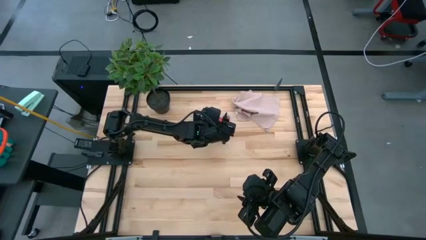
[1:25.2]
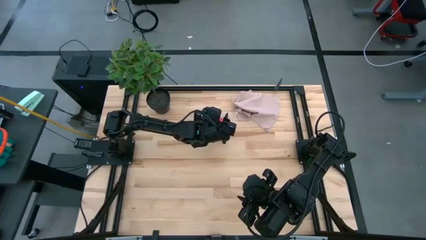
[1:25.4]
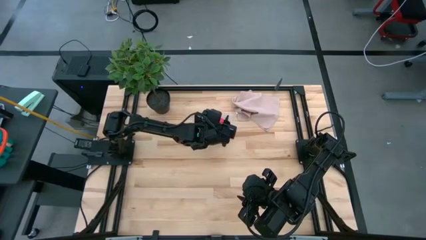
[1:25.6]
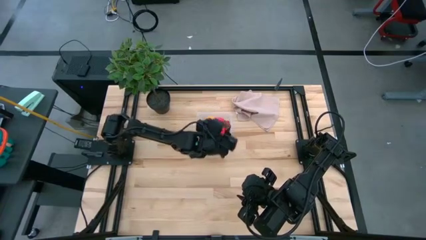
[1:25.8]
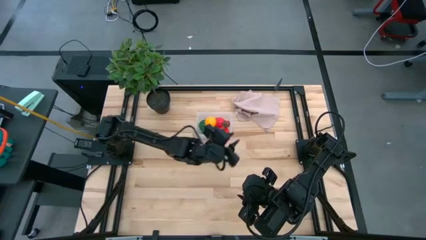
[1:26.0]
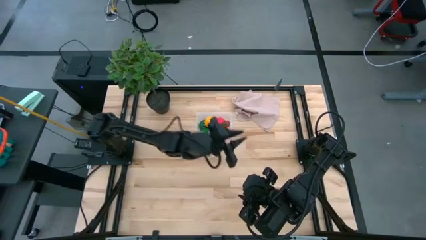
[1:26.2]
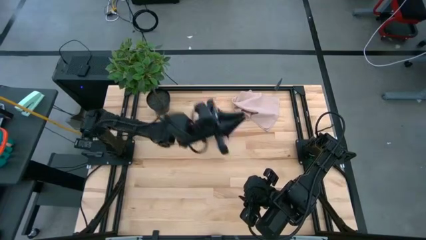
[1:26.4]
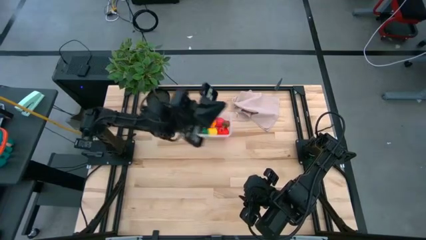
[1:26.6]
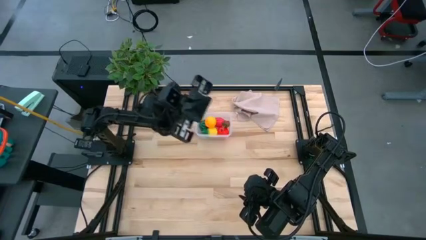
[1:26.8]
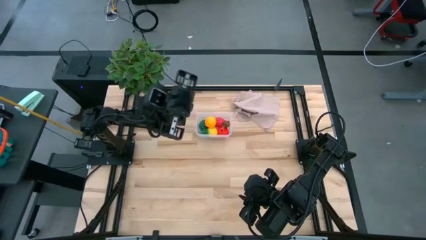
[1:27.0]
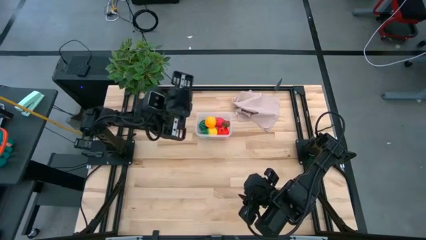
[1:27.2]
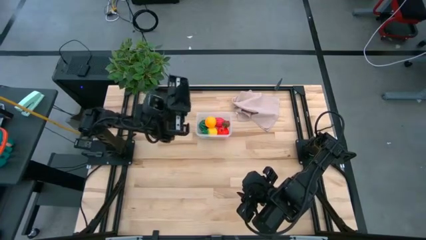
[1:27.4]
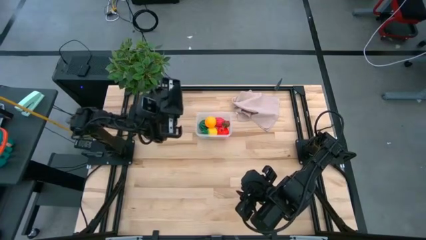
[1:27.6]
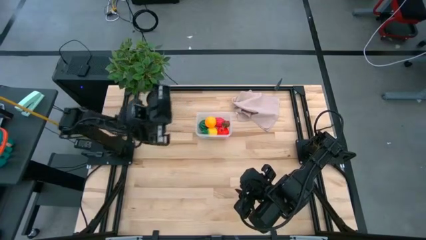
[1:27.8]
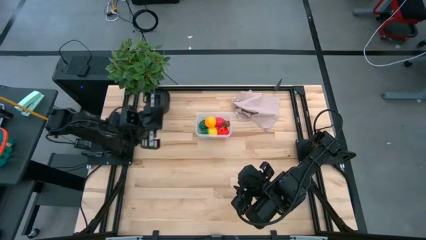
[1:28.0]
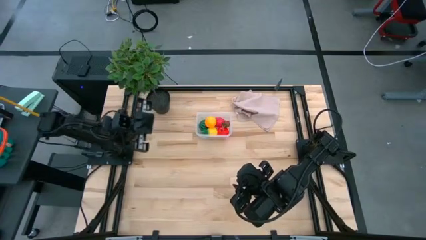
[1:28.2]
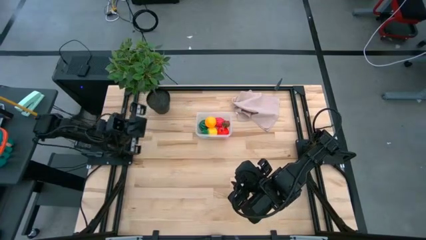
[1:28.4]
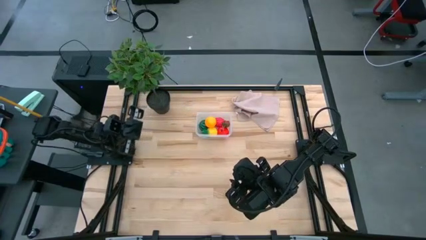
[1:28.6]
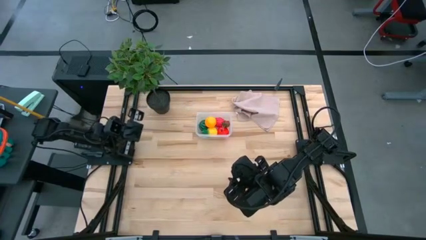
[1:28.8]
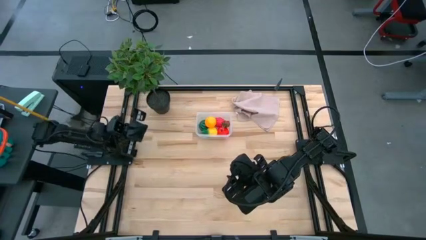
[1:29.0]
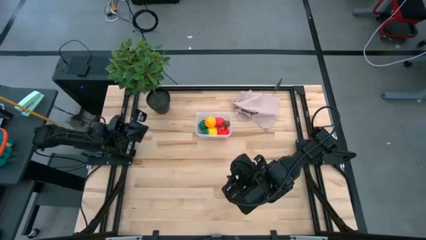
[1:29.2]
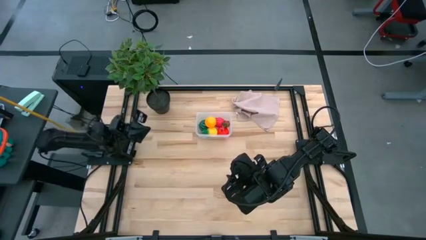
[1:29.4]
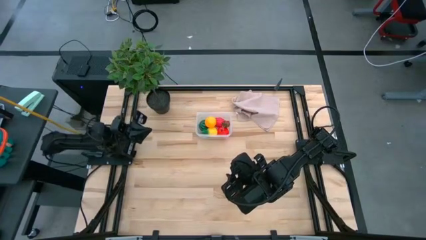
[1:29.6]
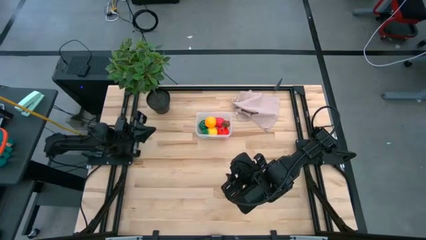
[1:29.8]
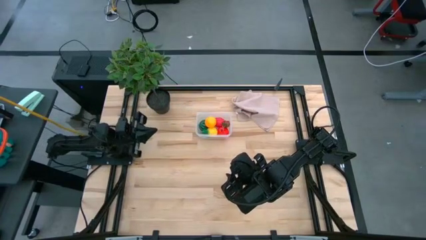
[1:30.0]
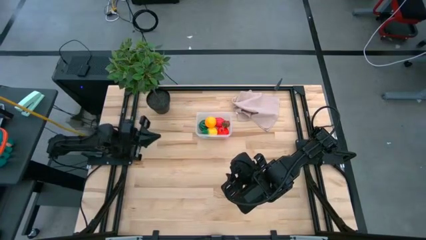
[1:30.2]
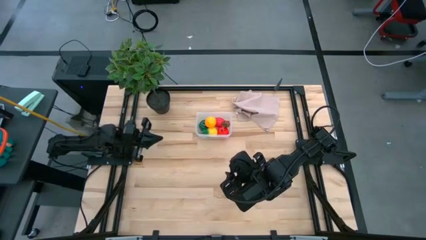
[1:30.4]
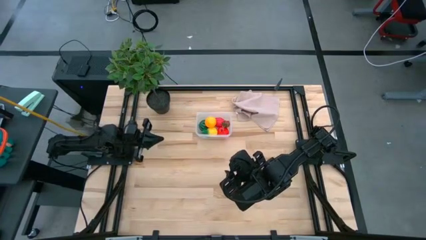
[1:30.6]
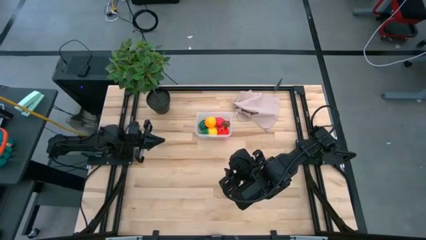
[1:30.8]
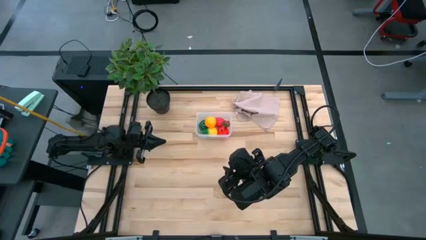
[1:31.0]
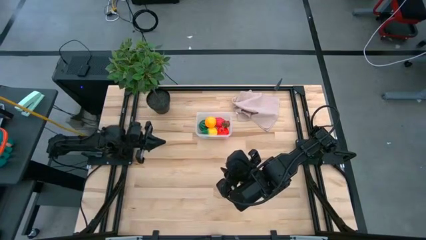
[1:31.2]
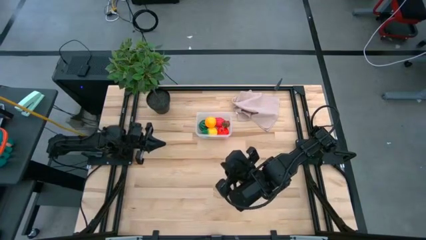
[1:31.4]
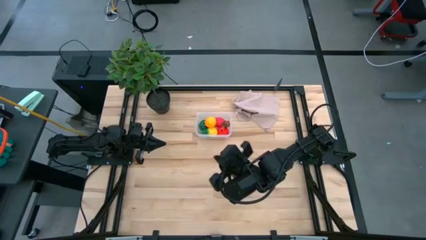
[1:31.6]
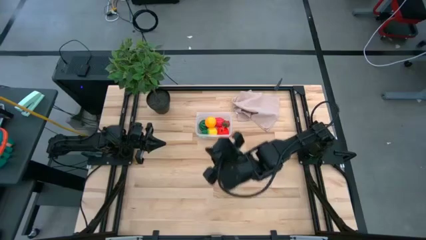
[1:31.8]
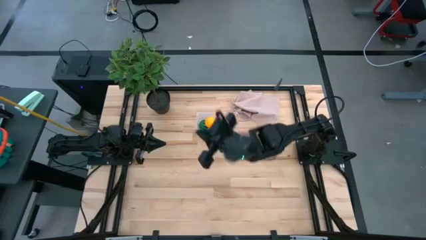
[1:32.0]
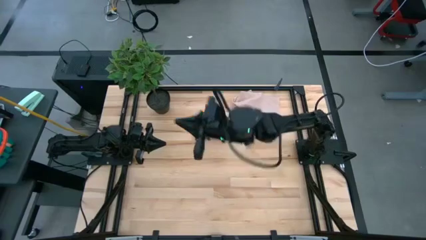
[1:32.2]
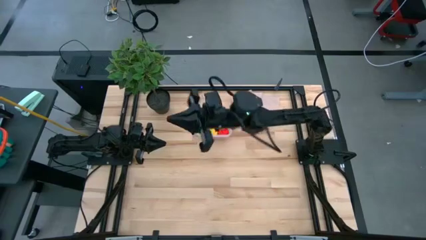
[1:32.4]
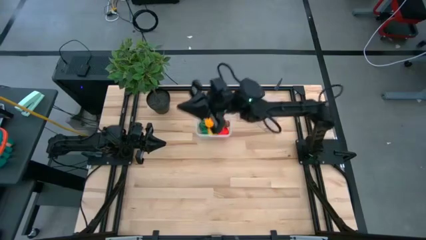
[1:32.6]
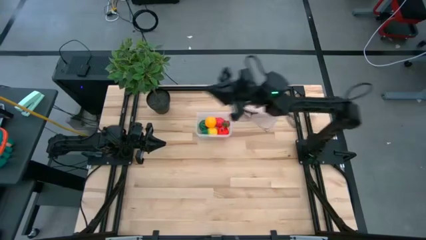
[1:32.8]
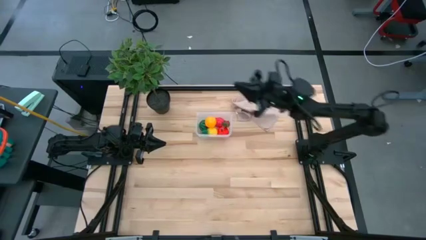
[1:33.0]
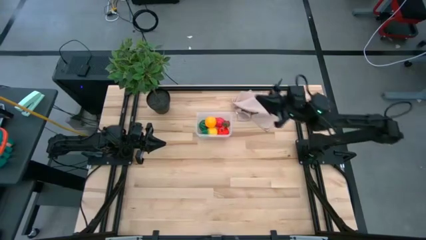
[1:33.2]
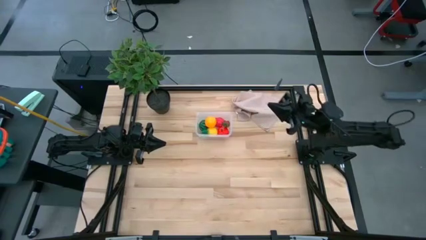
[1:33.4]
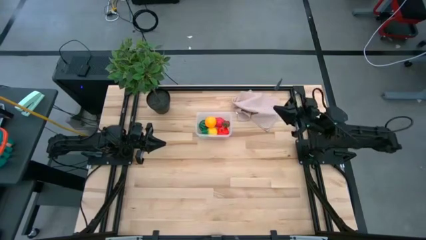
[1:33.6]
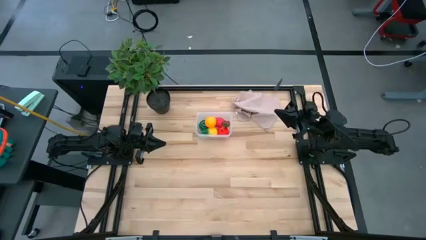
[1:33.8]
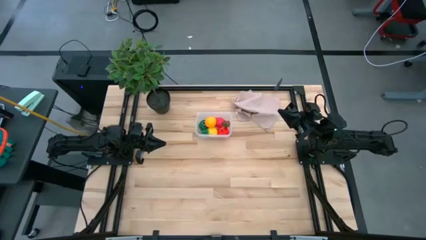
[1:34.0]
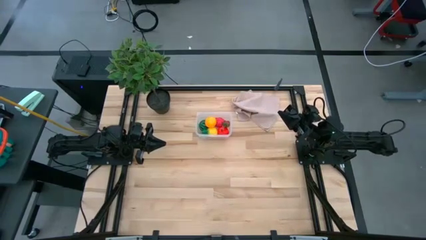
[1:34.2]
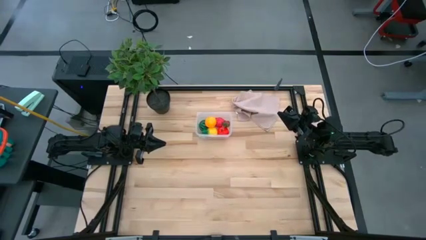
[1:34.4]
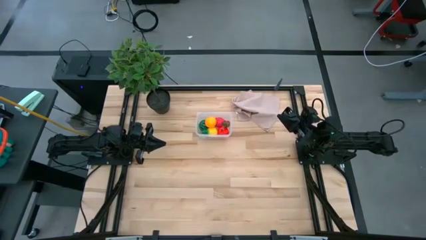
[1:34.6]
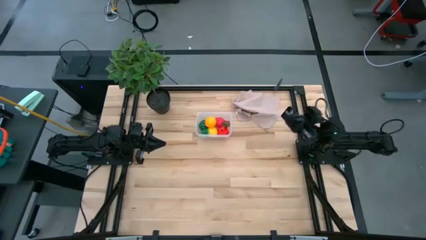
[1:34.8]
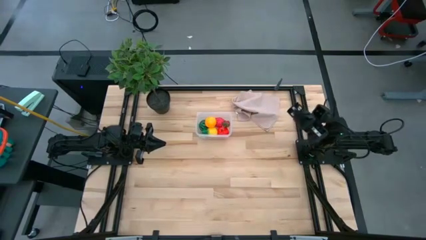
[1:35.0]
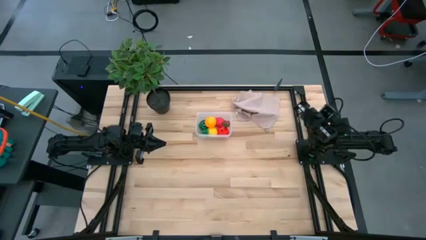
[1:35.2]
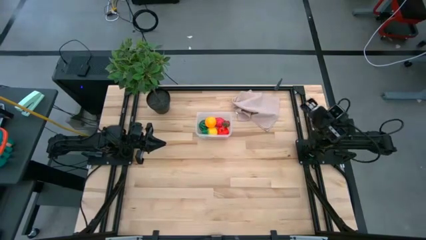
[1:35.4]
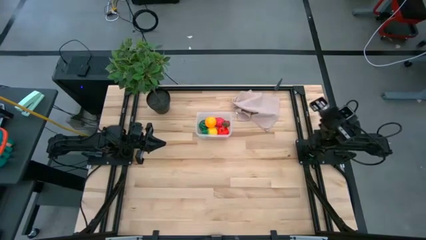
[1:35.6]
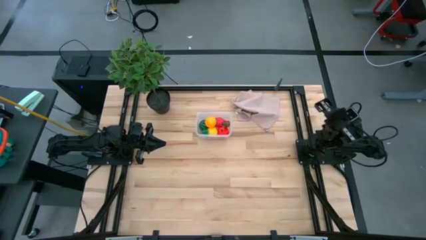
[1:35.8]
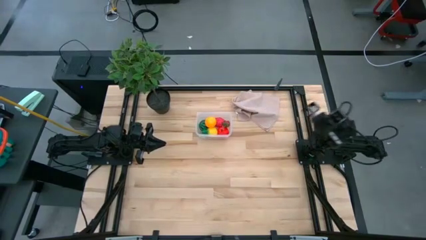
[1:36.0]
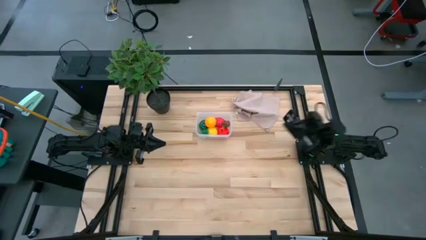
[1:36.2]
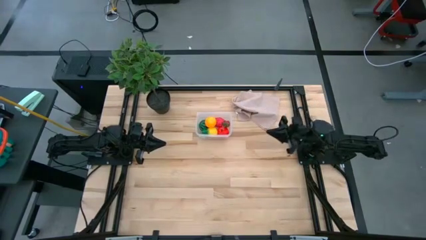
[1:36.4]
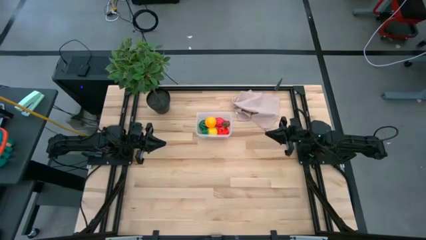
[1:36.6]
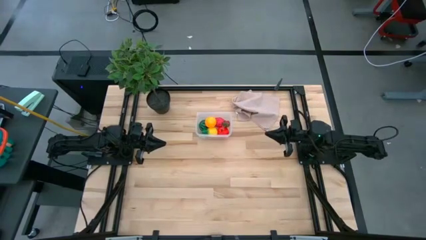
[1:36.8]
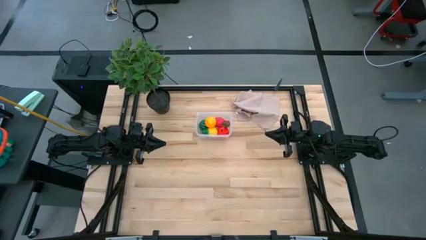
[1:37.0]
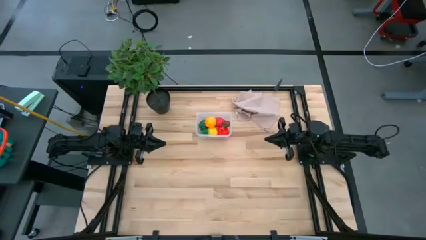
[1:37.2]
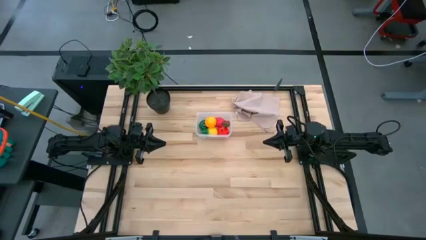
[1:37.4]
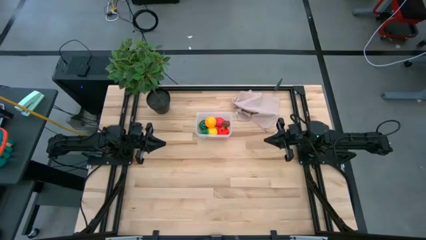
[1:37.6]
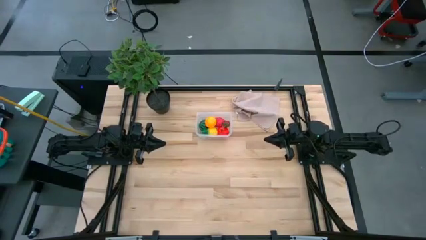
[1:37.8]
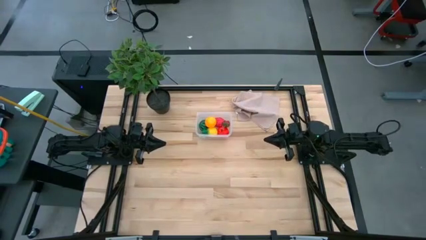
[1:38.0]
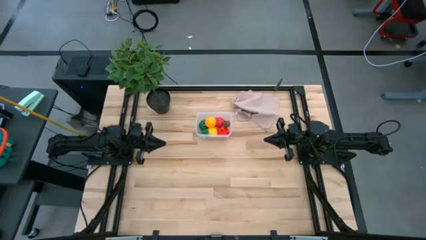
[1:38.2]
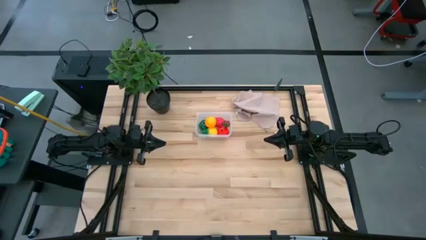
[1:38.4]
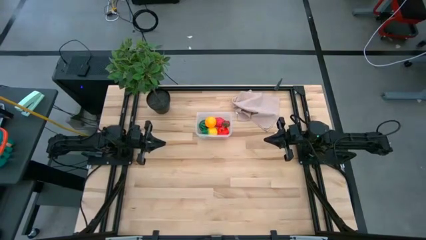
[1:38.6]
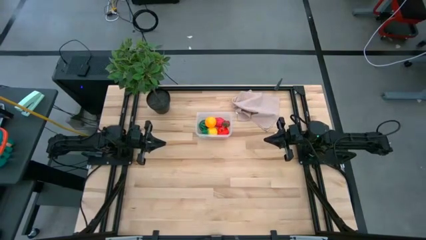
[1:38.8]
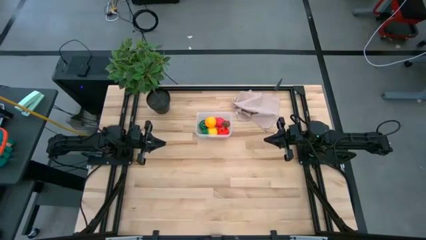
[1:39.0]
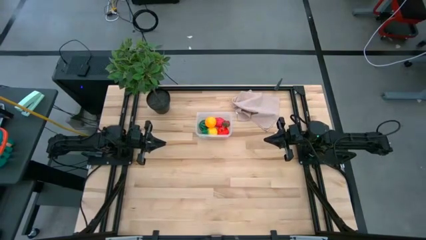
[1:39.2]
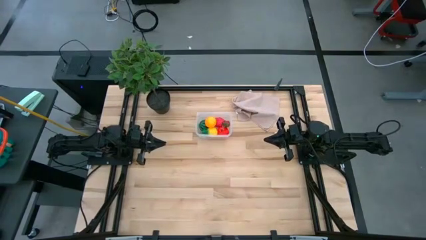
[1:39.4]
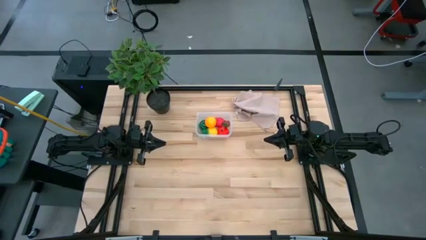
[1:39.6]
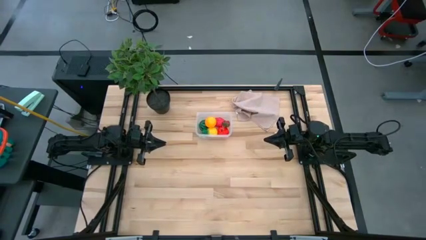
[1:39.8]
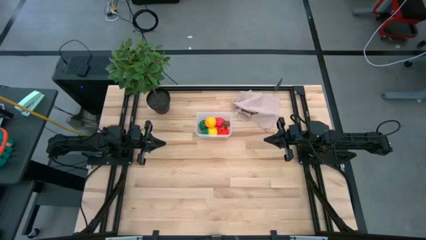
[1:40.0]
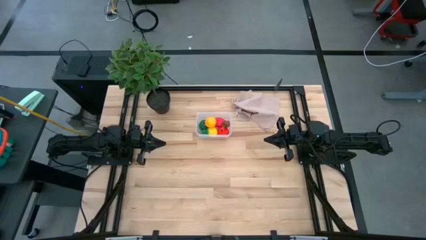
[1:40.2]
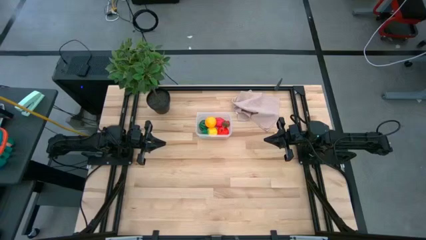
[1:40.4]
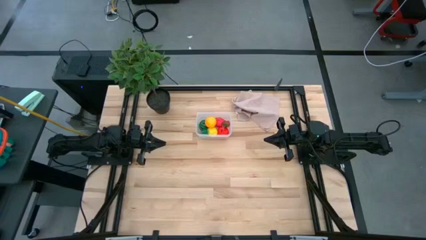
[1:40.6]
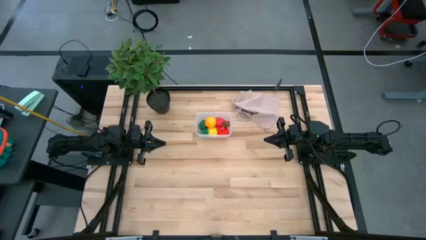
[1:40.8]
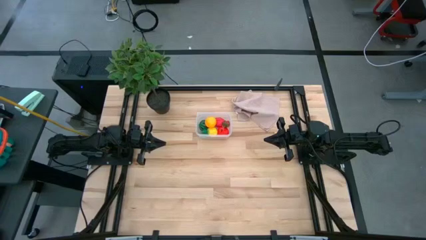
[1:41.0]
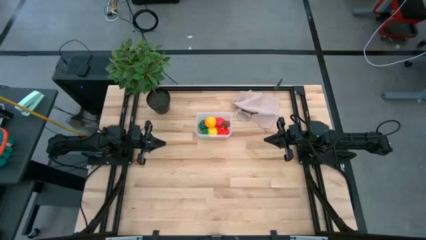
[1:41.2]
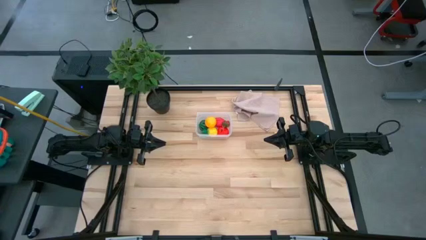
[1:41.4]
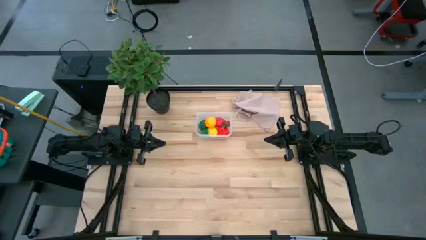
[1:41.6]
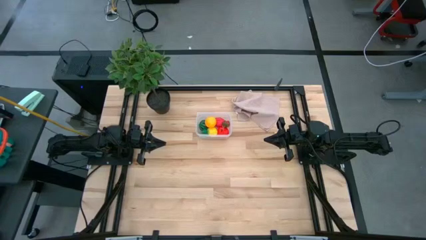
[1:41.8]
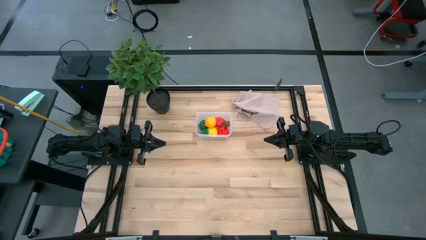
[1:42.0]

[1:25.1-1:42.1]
Task: Pick and placing Produce into tupperware
Return to Home Position
